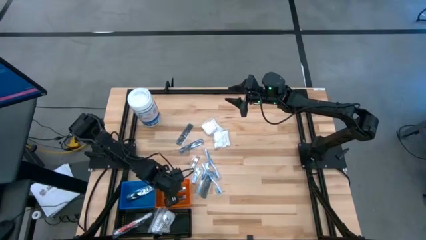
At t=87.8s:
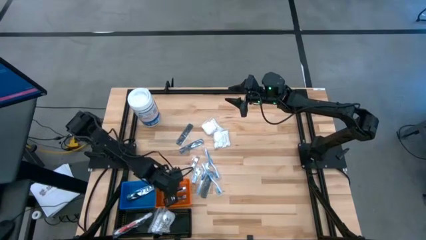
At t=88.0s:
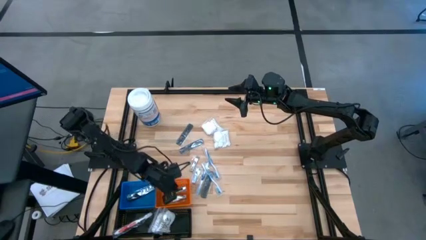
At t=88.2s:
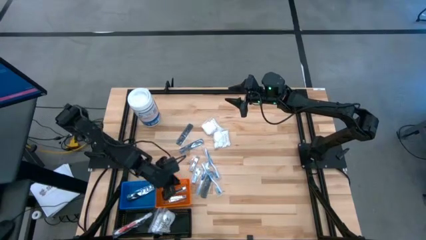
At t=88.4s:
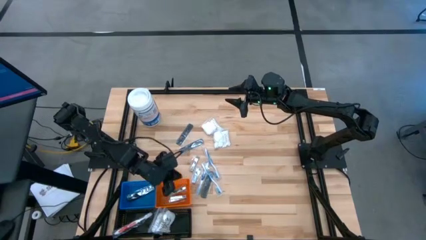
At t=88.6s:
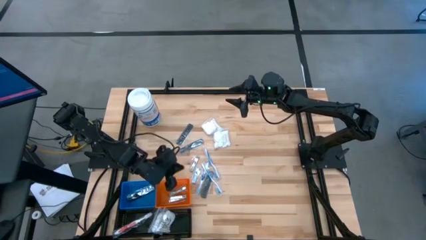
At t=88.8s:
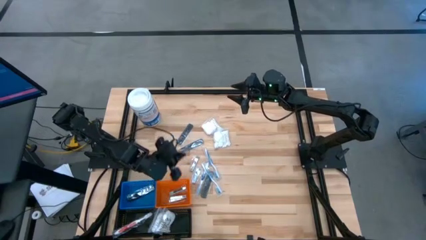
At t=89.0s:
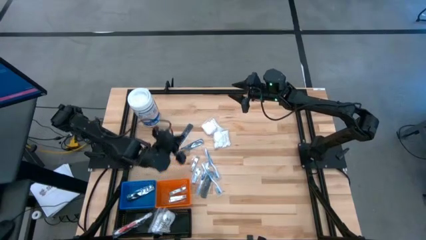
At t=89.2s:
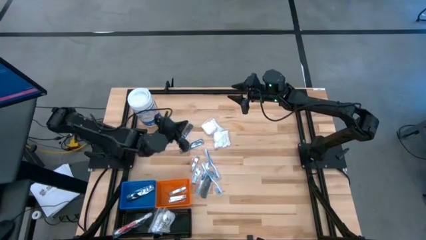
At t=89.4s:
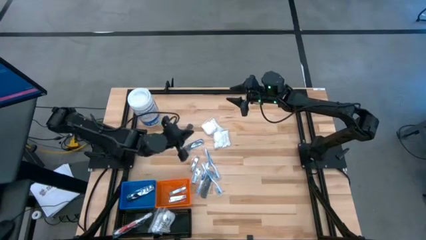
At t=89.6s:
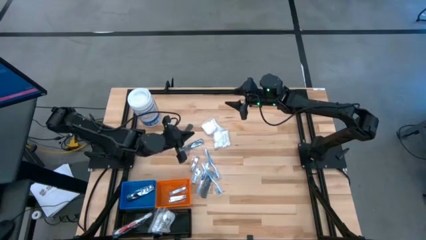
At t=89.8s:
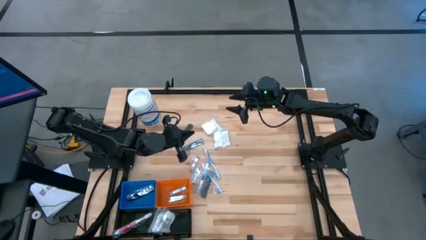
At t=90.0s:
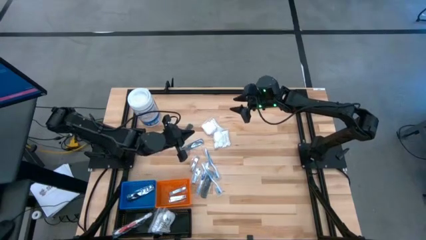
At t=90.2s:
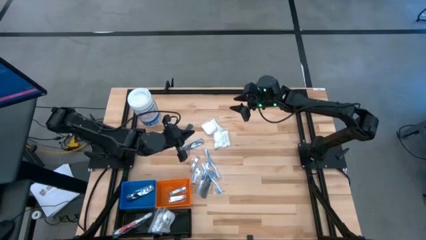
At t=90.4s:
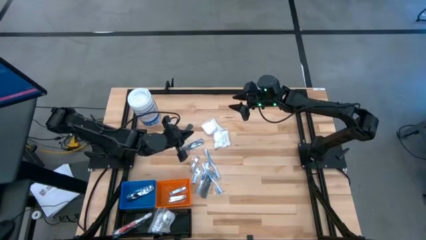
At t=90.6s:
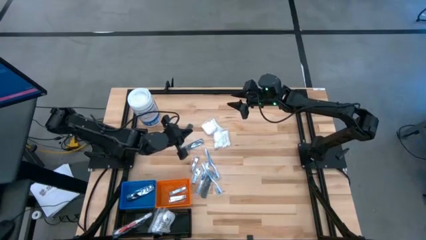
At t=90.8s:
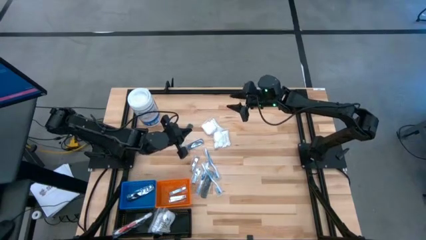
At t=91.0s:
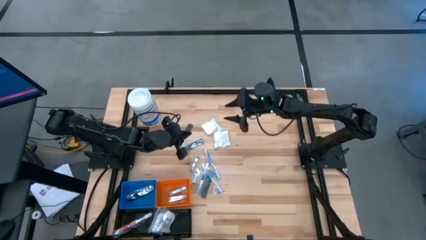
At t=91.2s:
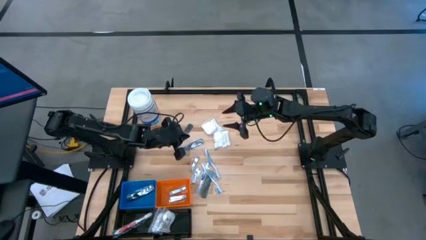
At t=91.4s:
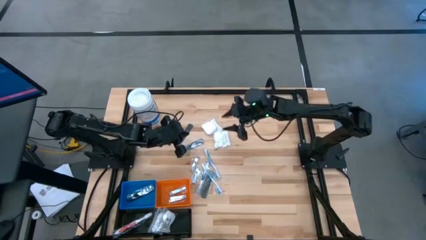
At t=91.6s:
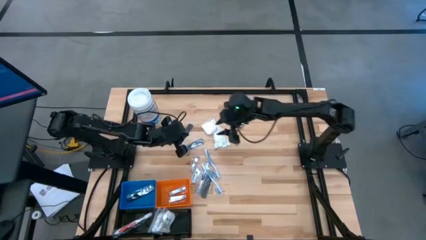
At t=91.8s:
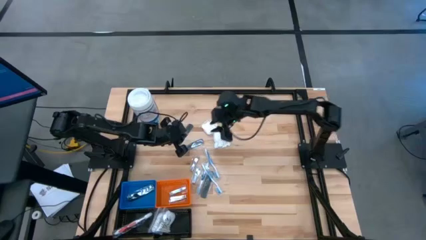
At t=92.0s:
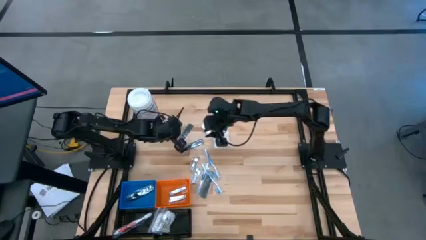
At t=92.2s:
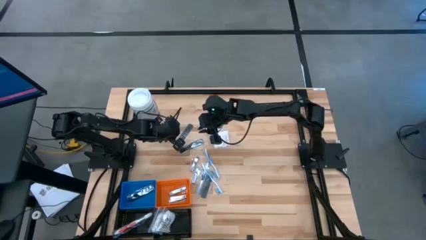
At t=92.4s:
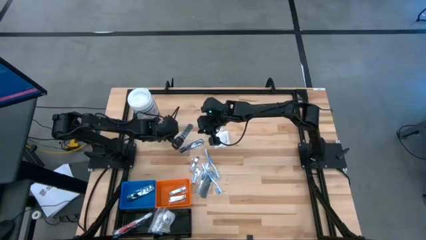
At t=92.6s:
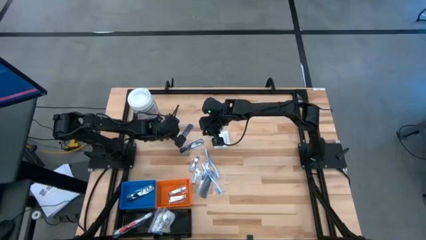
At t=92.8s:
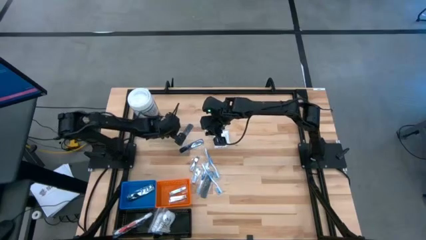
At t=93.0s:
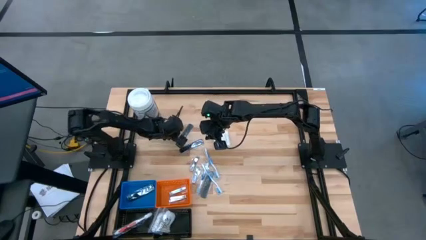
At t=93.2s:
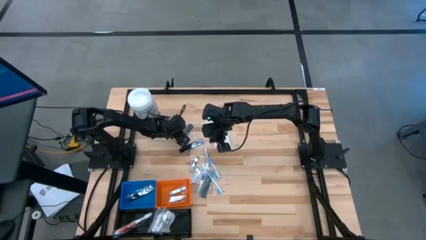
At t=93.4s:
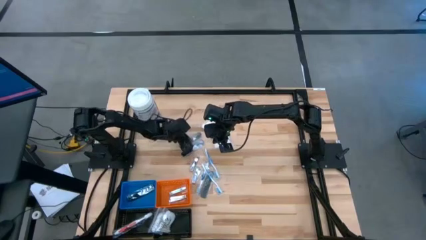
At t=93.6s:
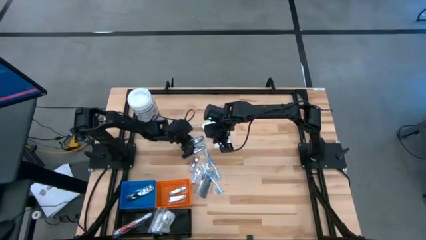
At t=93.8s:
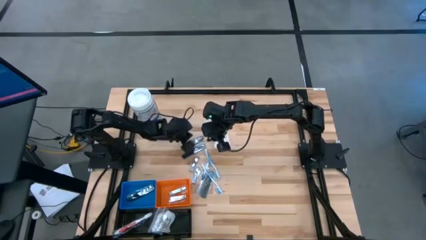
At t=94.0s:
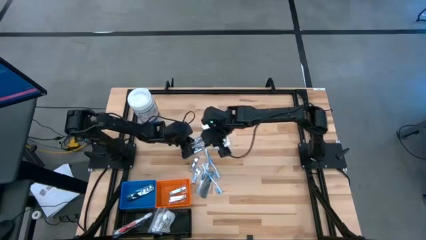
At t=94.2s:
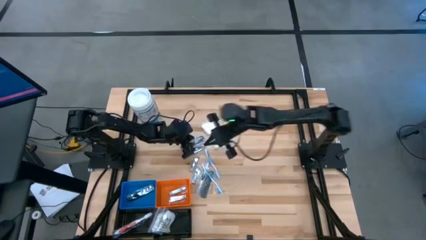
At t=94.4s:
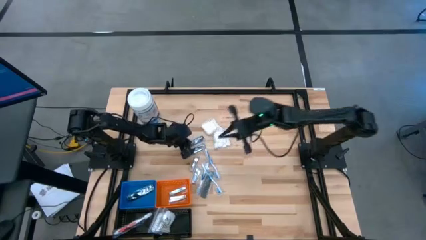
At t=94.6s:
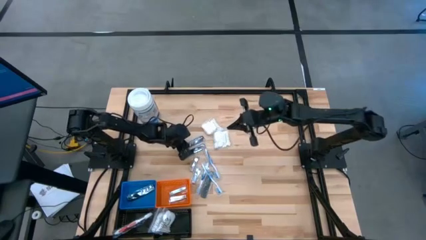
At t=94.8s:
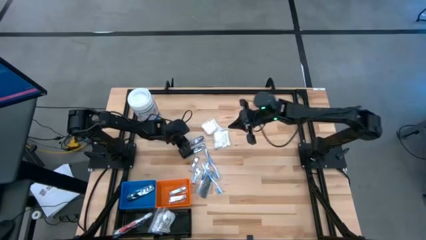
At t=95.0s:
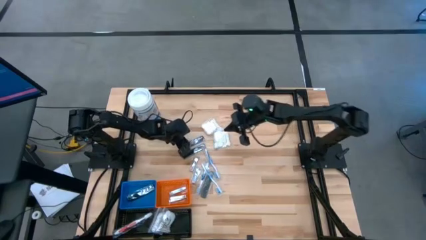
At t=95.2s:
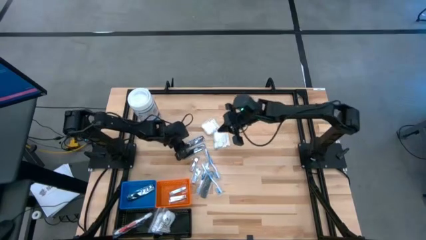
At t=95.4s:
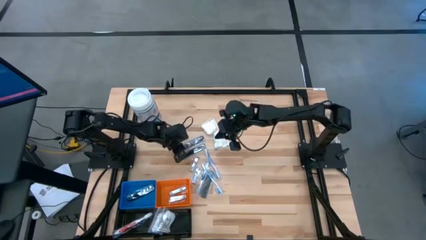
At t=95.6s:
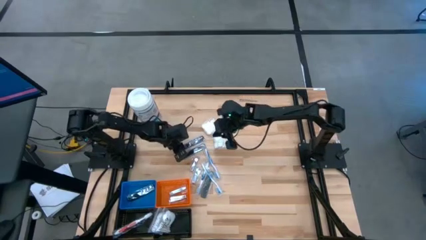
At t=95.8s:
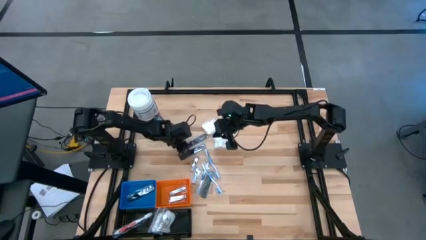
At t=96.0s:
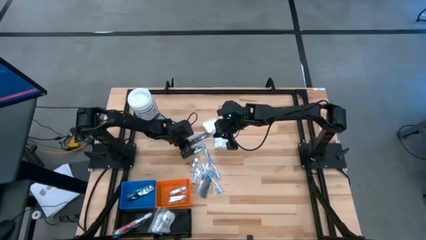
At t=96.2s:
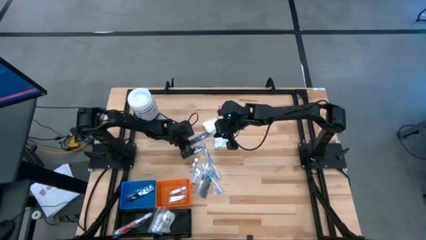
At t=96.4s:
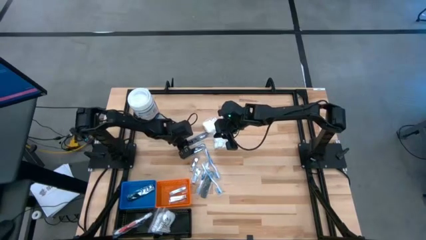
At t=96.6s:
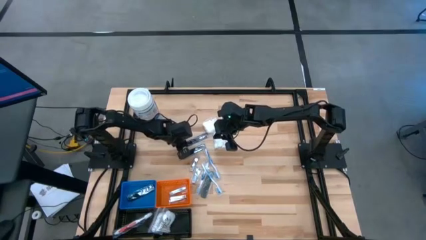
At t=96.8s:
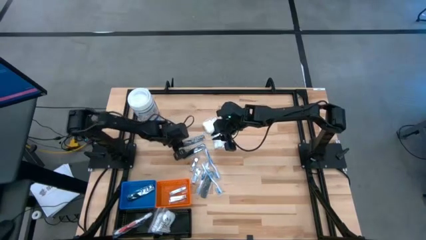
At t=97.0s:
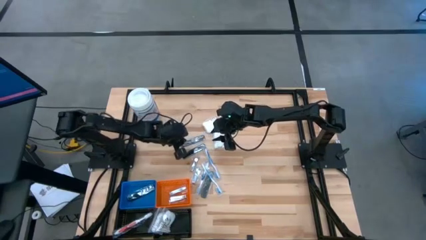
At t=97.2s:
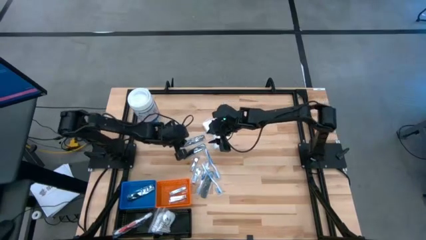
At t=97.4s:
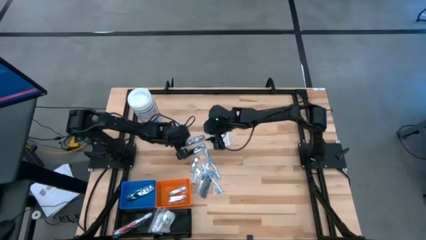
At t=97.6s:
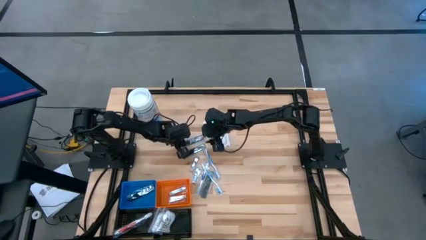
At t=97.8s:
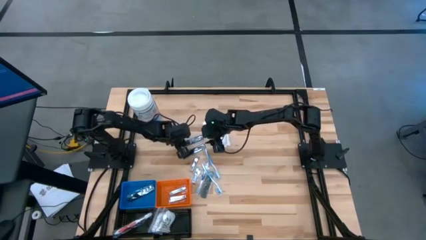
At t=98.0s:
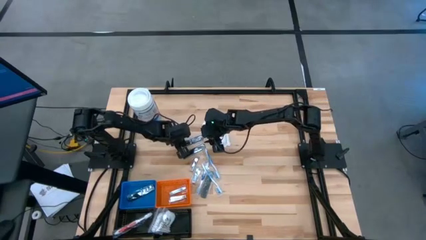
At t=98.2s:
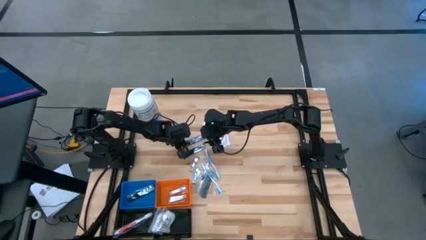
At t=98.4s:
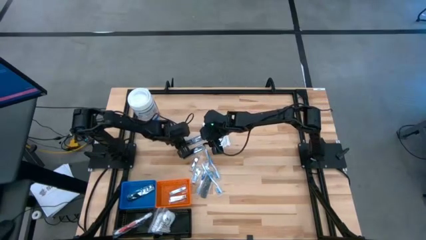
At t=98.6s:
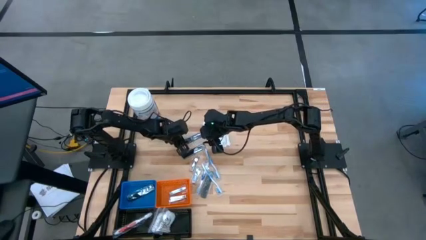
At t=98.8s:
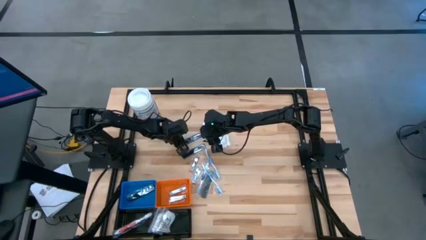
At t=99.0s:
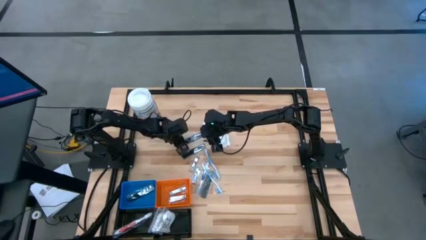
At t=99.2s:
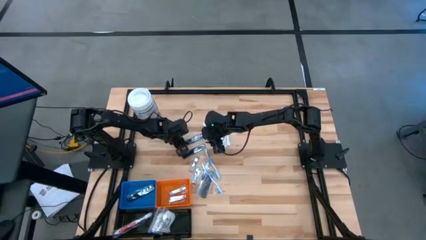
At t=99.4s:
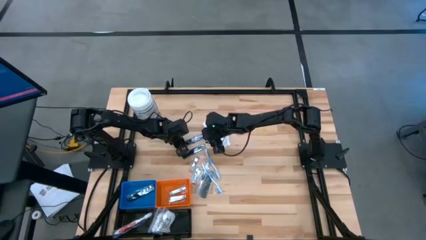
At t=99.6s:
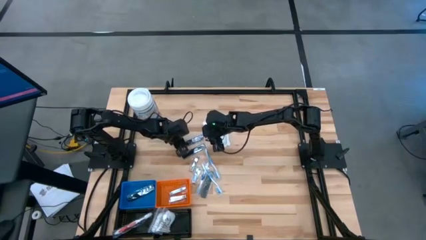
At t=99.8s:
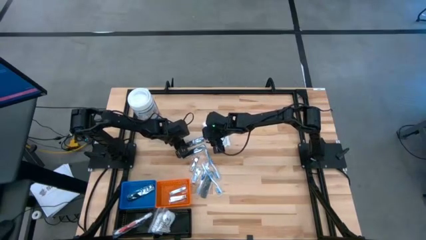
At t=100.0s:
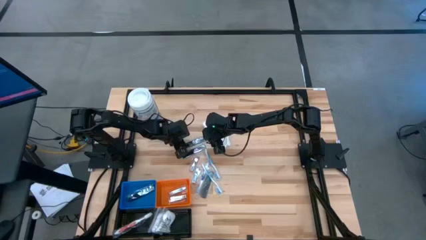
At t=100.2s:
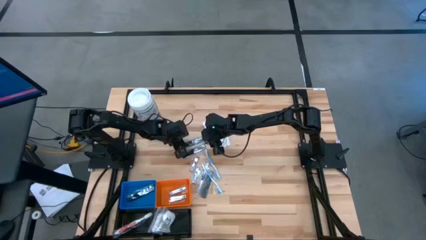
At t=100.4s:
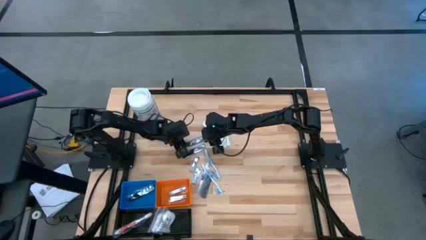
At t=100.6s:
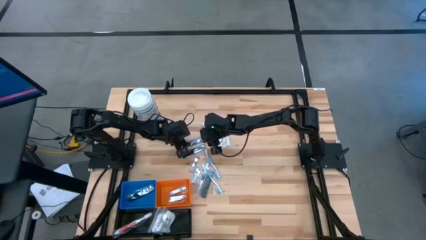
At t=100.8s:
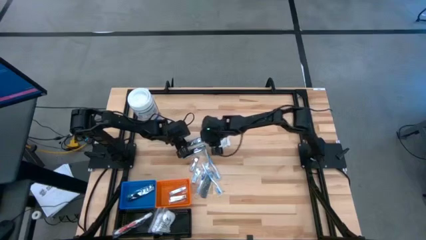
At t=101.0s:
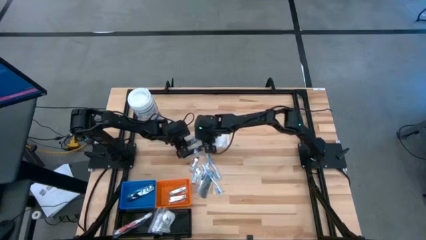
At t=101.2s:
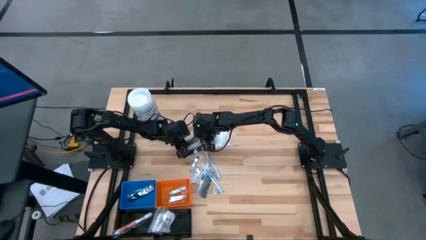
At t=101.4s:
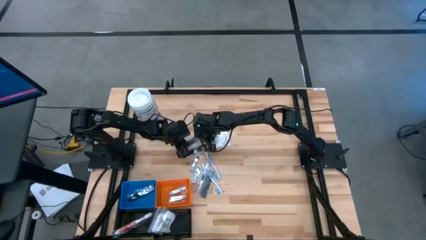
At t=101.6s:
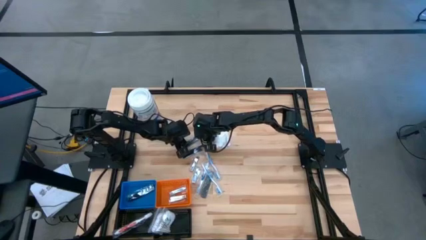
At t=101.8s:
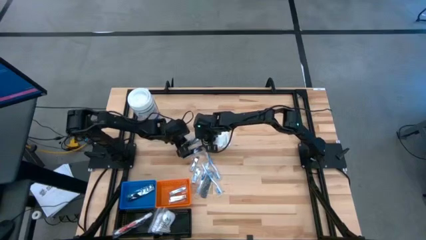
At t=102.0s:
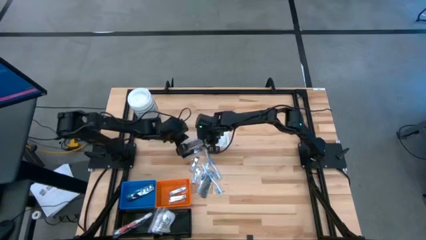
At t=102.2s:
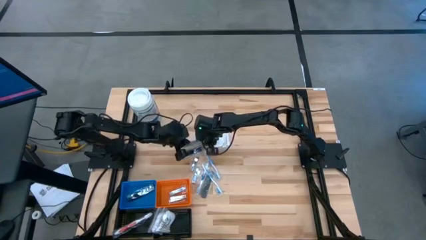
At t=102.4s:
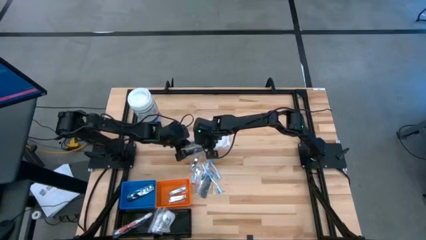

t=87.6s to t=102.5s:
Task: Pick & Place Travel size toiletries
Put the top black comb into the blue basket

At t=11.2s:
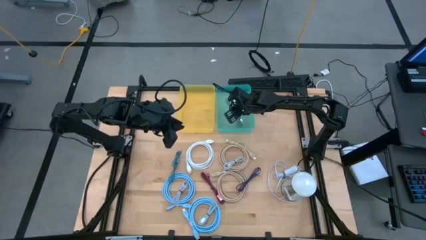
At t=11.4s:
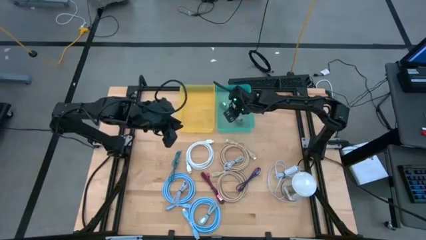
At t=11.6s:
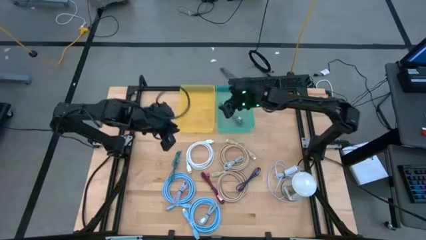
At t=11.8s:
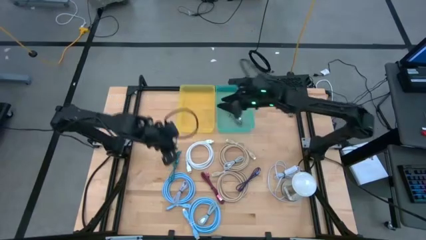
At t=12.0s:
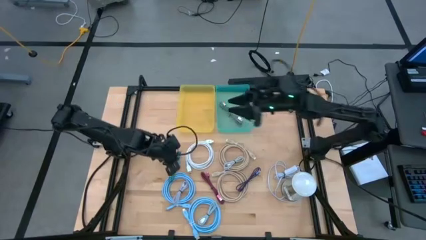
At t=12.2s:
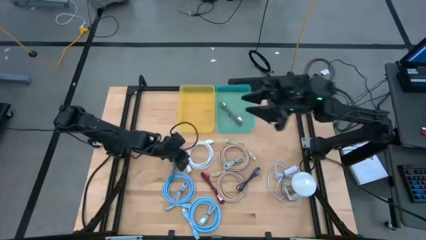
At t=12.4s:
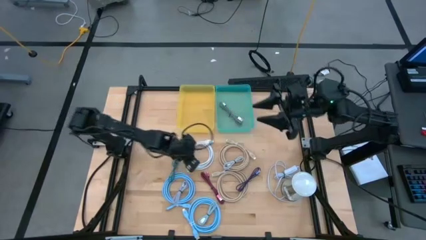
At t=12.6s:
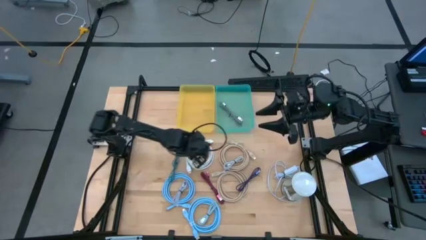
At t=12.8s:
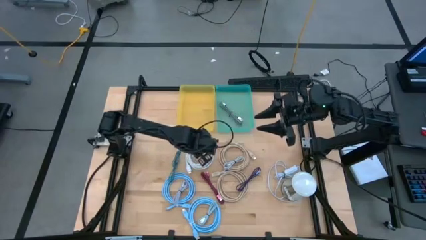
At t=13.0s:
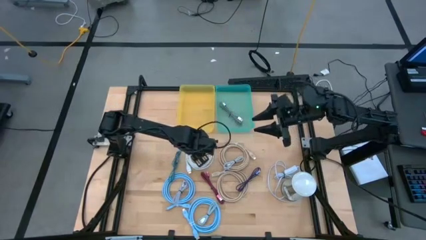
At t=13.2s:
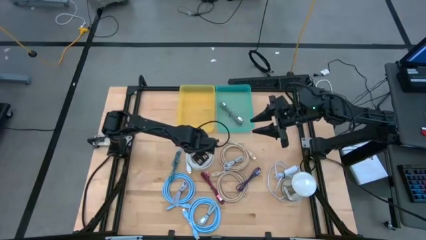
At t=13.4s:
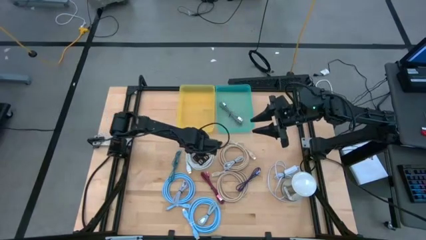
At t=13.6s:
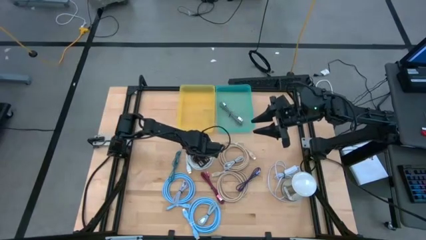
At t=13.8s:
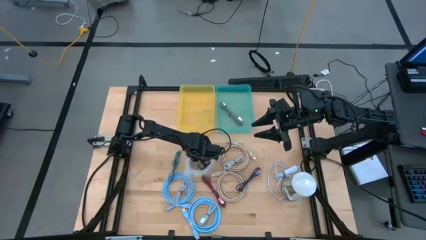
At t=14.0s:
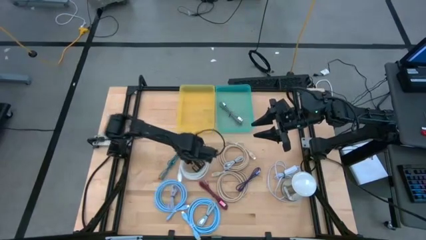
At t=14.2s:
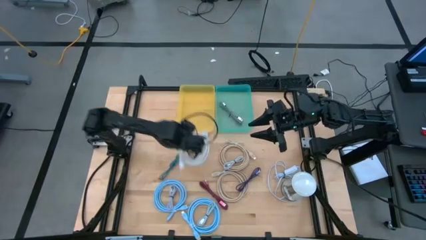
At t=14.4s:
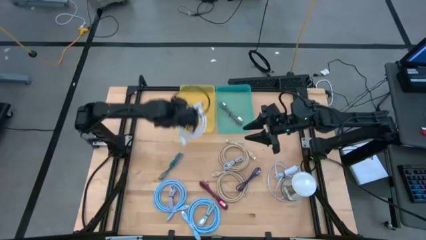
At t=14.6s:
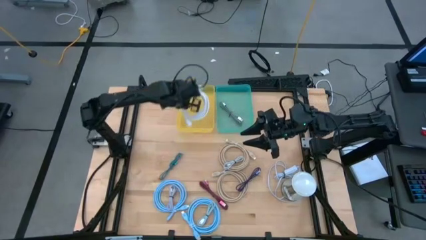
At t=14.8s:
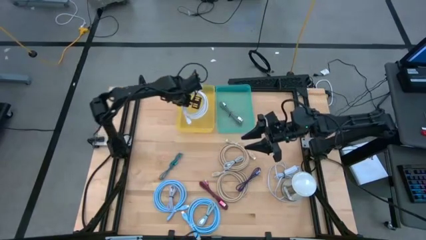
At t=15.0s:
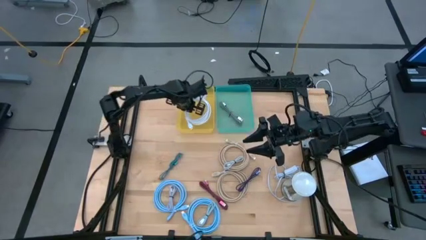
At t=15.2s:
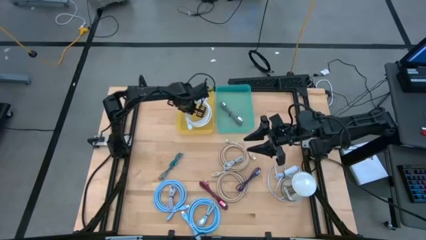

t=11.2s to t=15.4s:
Task: Pick and place USB-C Cables
Put the large white charger cable into the yellow bin
